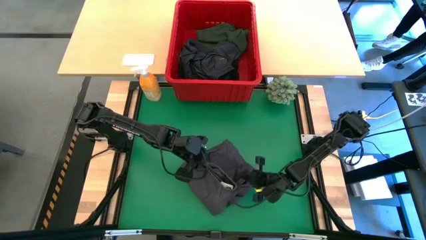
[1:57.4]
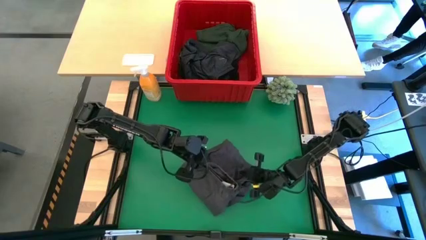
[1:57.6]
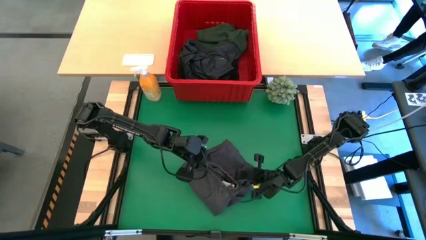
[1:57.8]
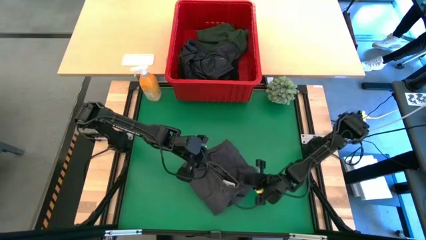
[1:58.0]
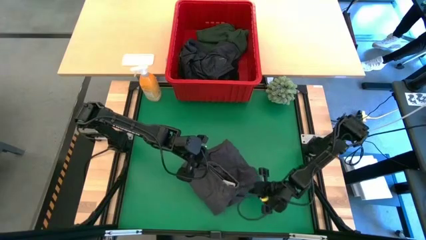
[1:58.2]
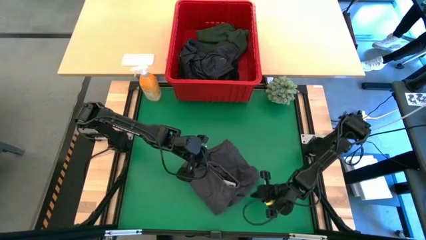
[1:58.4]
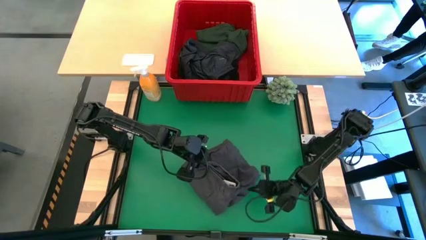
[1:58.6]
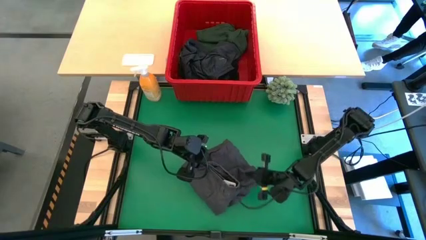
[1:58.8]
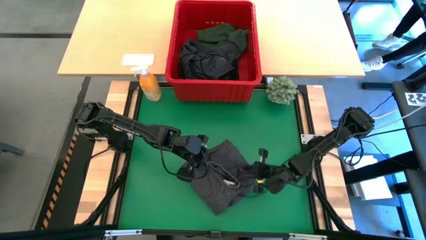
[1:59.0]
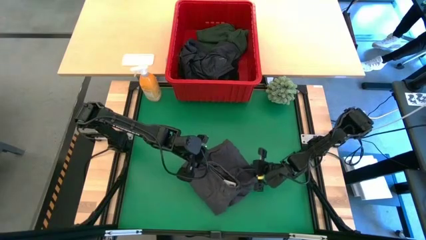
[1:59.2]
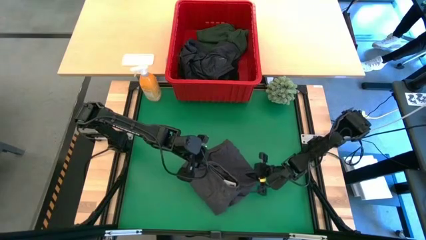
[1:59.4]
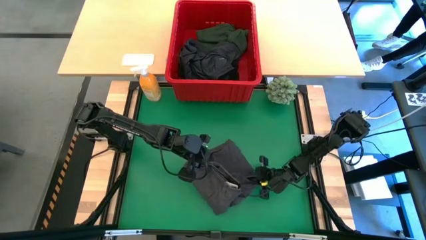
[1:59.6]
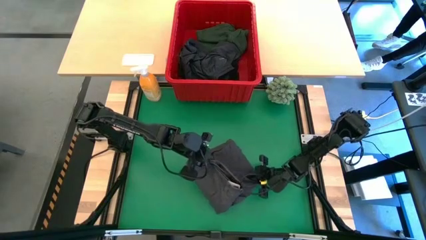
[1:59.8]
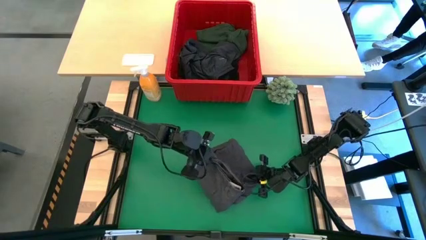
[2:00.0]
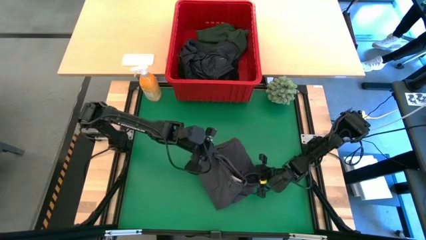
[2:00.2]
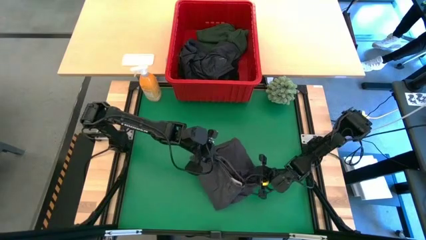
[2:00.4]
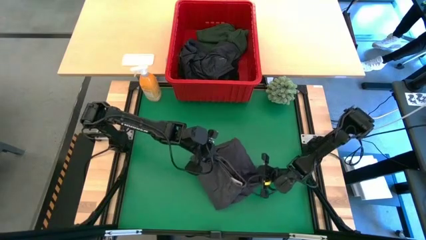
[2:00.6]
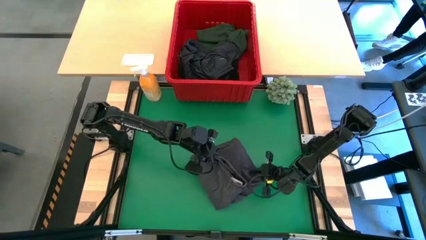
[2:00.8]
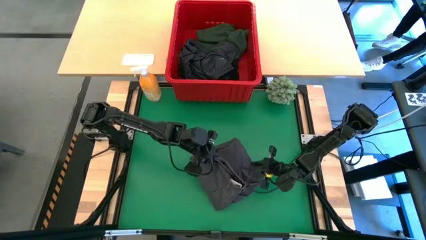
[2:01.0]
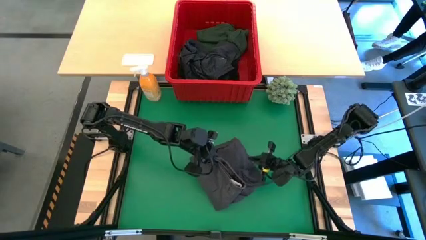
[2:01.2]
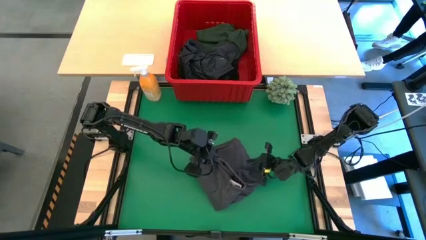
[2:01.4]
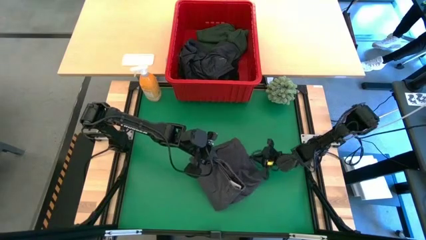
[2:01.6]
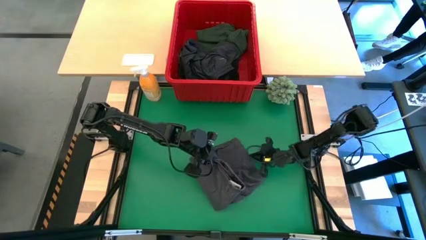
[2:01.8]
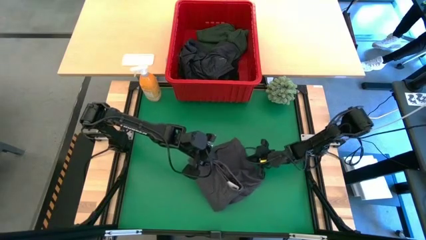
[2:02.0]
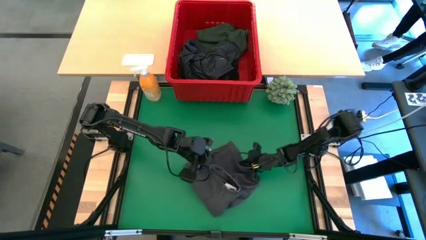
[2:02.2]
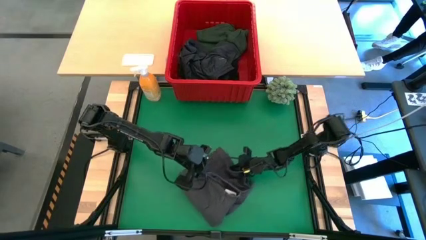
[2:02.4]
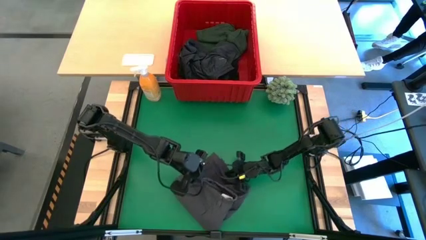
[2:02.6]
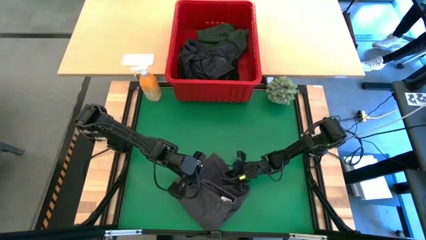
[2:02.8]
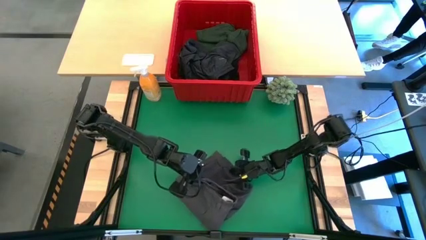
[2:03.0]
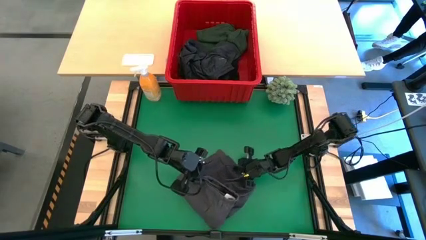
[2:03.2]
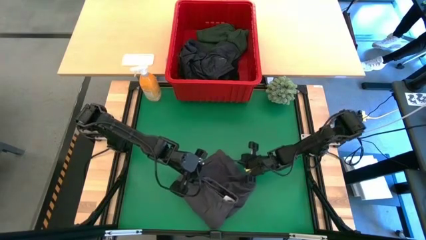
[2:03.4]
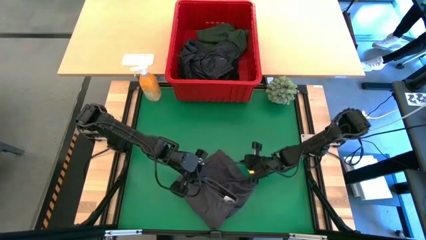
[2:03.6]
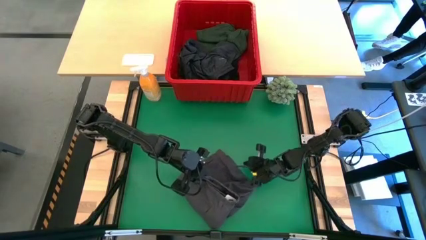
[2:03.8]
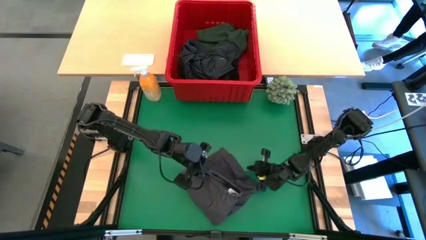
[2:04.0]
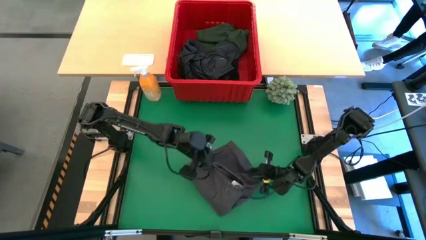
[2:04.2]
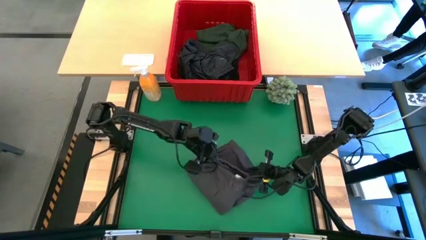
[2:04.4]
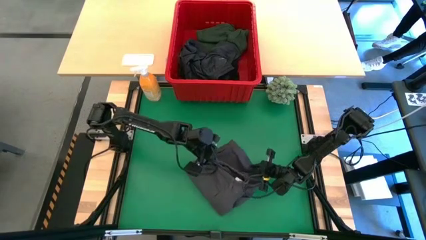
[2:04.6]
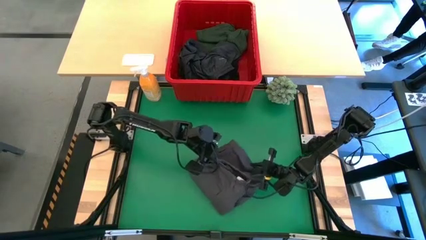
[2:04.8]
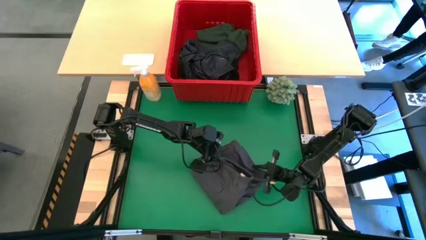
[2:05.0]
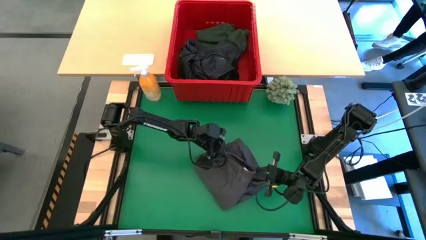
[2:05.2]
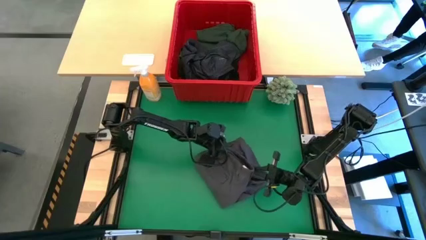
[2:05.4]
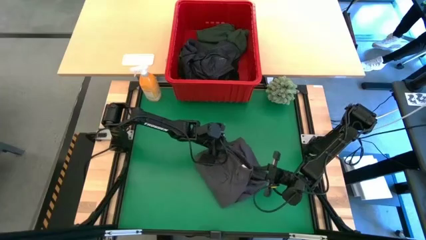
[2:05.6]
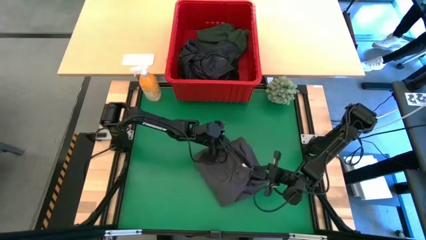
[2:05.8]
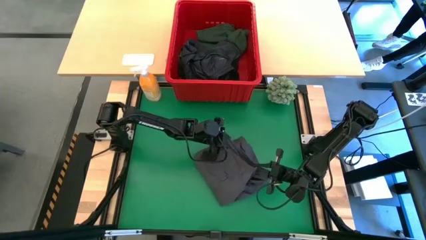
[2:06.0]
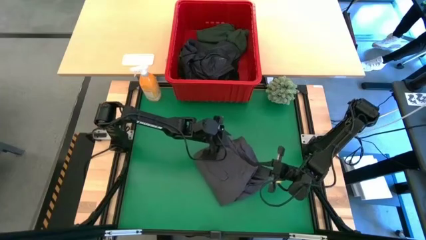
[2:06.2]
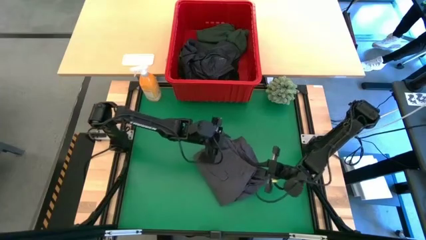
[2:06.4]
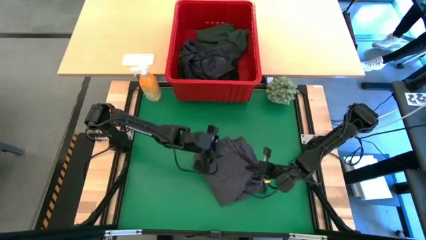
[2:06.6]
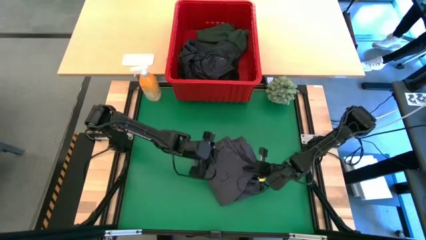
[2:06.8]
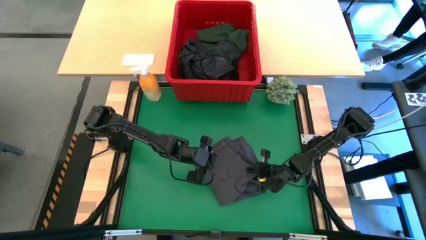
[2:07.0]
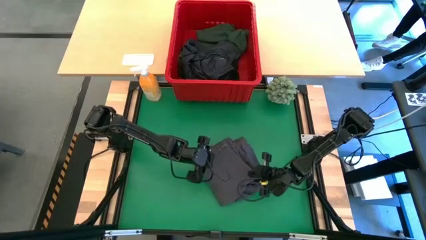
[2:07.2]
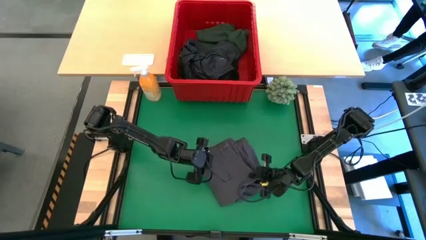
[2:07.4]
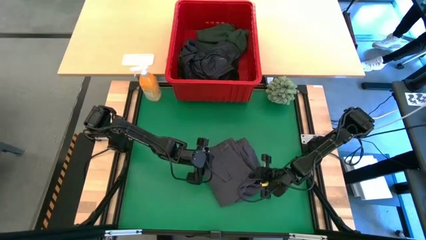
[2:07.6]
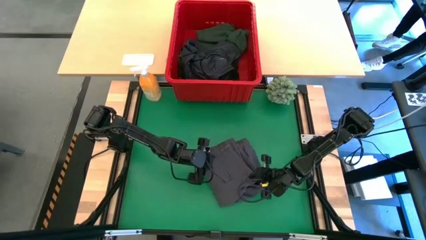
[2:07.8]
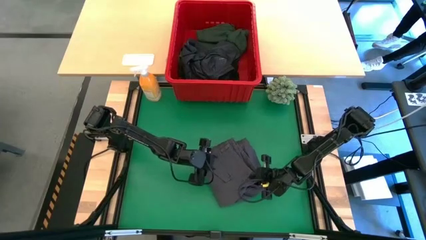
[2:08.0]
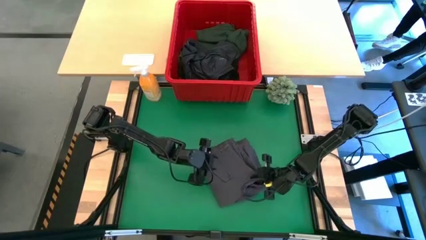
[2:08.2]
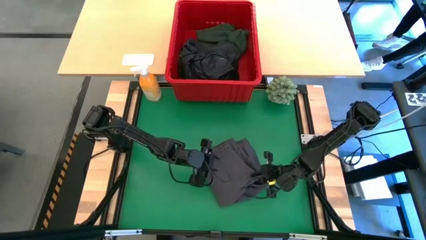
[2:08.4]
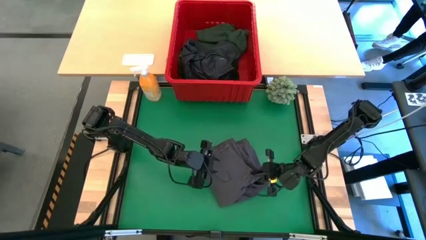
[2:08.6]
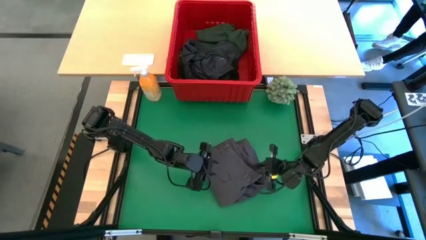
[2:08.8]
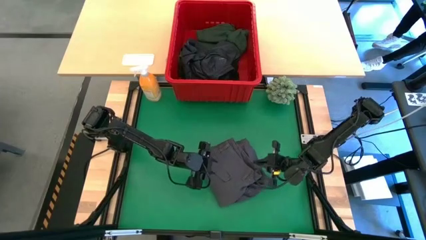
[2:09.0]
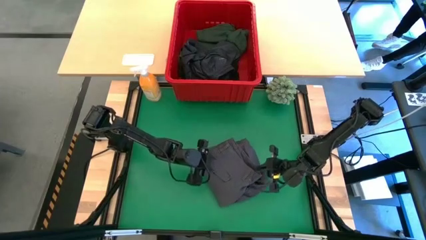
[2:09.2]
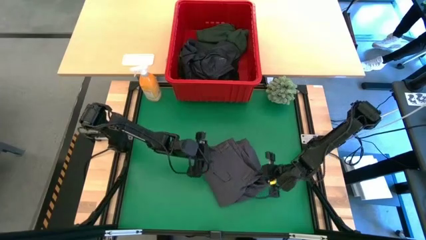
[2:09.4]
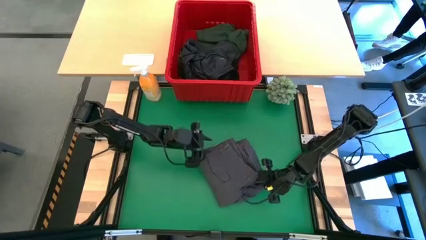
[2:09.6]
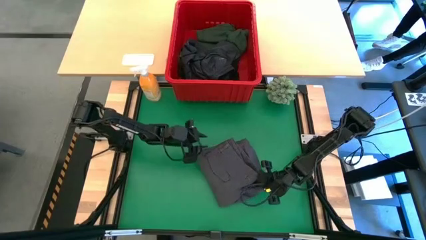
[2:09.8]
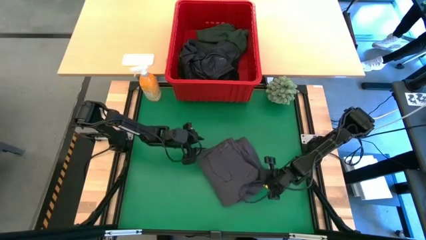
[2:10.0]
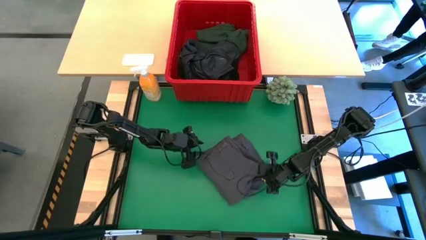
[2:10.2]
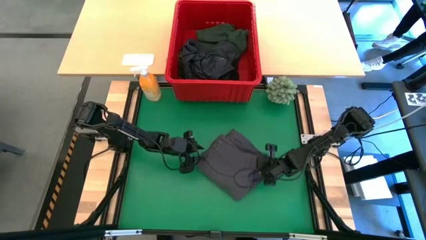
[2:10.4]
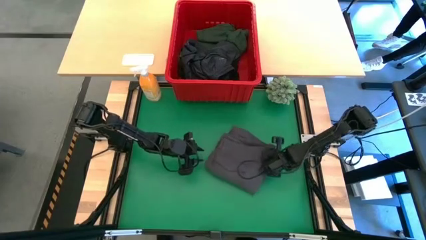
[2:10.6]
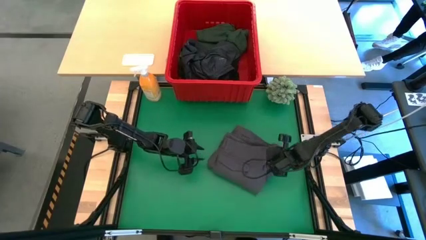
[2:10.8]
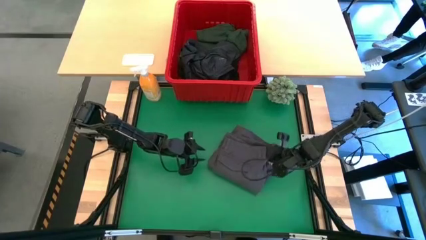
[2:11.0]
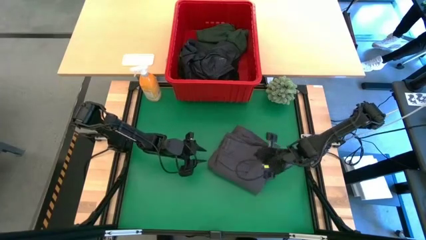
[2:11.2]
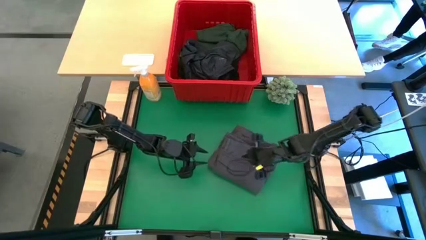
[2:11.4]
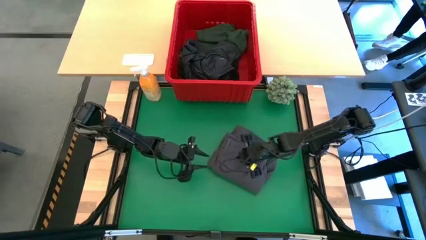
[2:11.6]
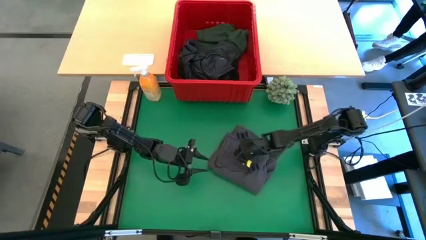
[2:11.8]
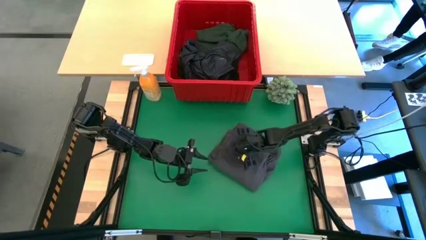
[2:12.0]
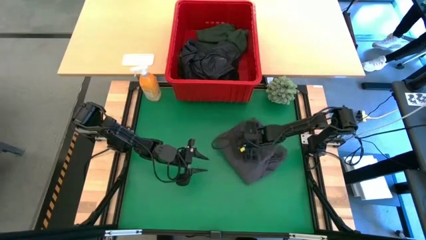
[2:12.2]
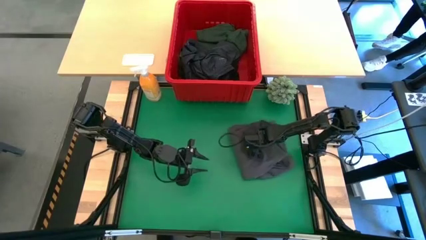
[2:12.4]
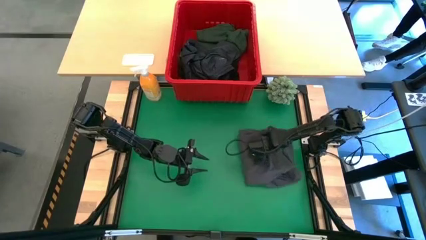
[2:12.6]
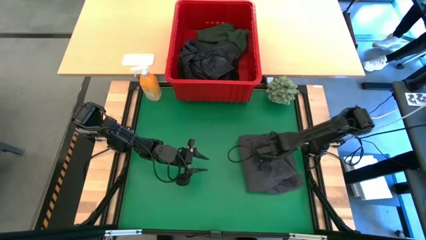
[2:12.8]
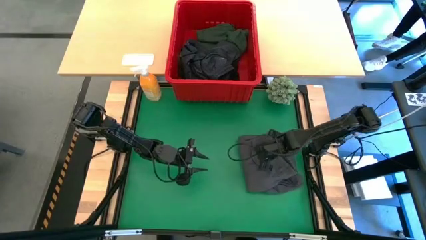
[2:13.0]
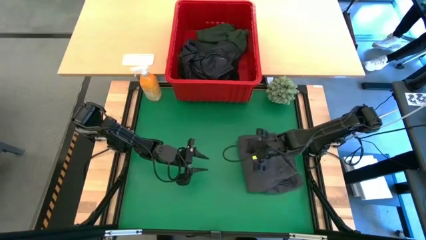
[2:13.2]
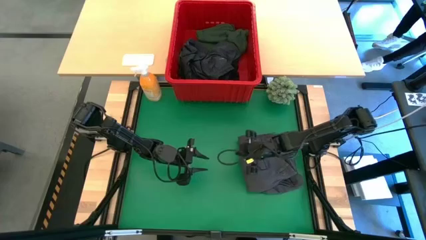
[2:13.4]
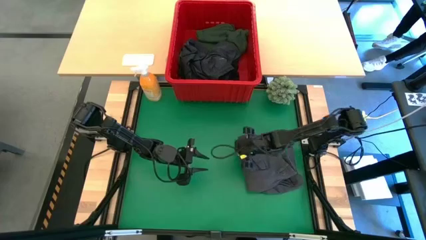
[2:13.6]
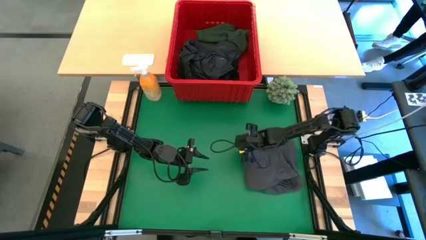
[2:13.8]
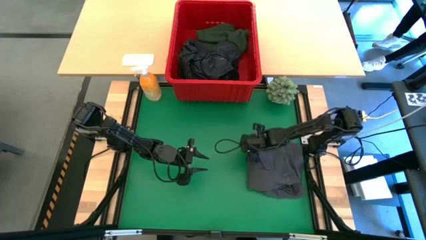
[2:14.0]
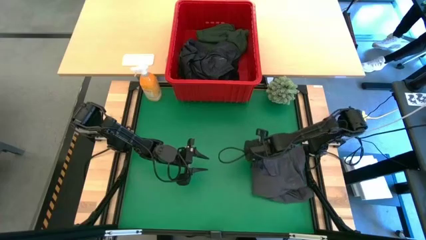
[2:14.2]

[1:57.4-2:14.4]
Task: Fold Laundry from Bin
Fold the gray short
